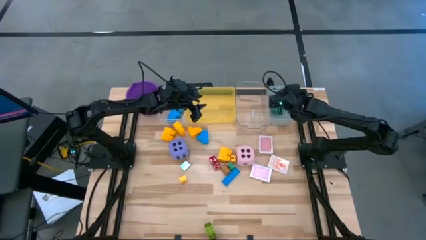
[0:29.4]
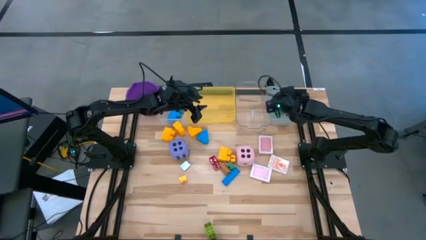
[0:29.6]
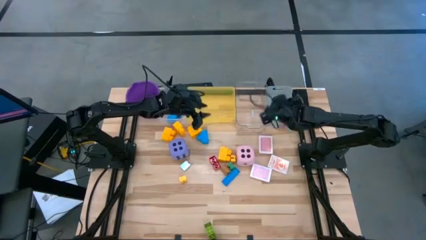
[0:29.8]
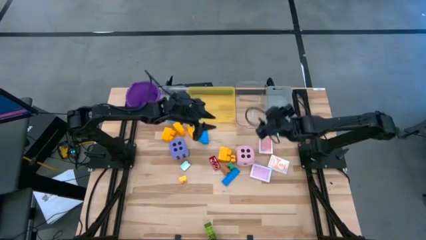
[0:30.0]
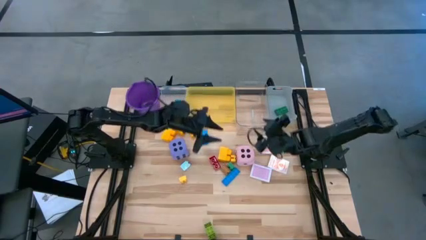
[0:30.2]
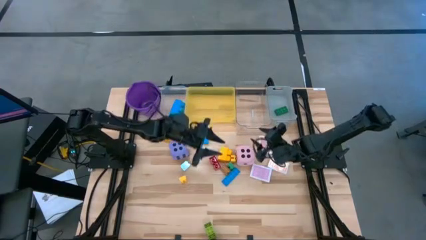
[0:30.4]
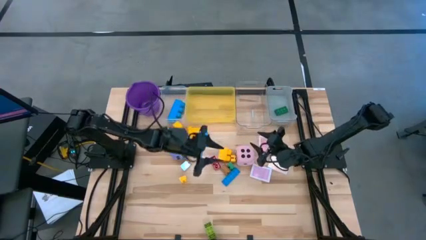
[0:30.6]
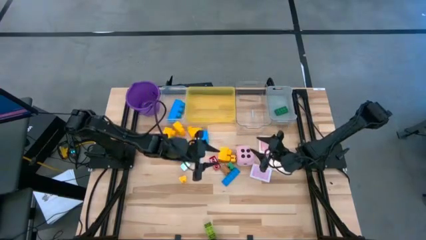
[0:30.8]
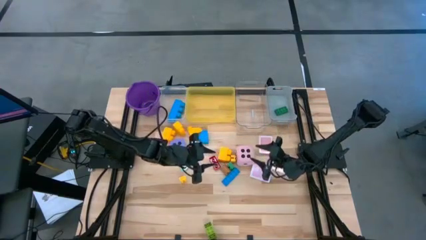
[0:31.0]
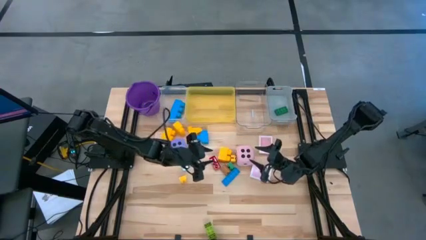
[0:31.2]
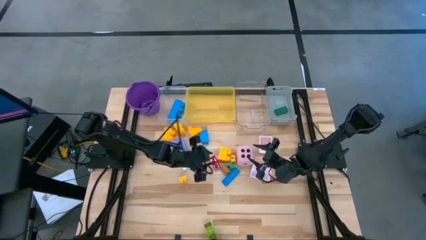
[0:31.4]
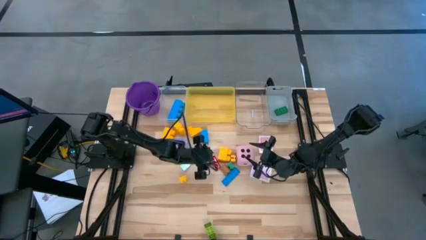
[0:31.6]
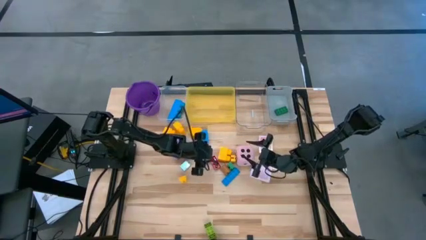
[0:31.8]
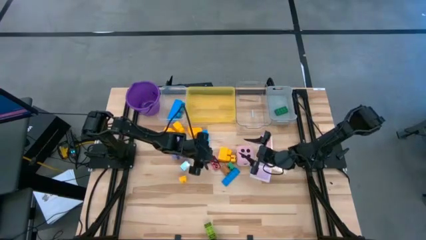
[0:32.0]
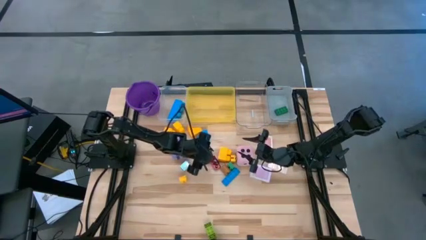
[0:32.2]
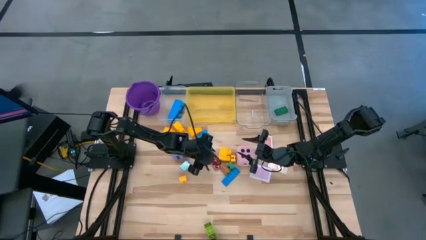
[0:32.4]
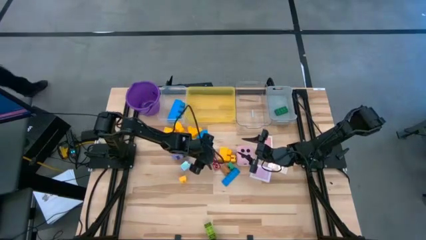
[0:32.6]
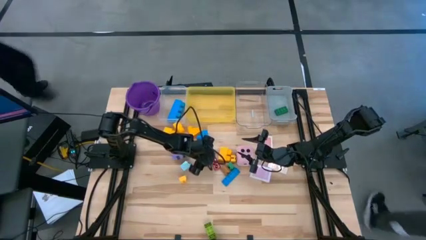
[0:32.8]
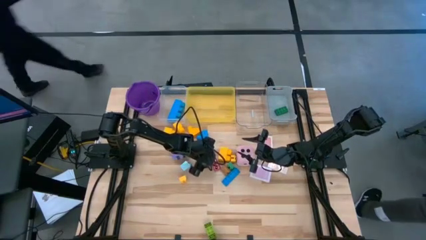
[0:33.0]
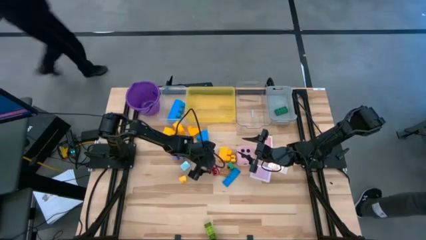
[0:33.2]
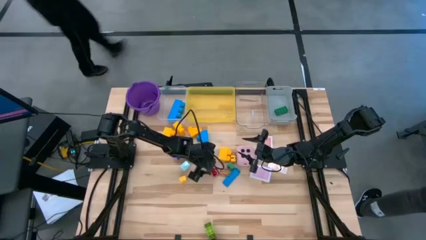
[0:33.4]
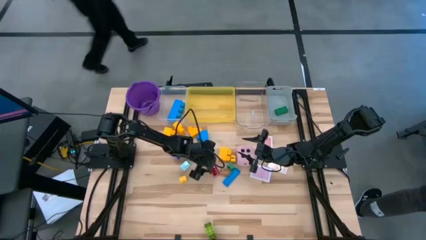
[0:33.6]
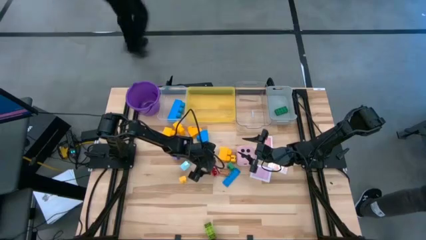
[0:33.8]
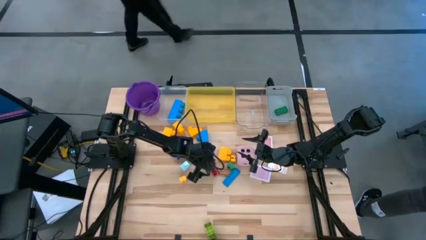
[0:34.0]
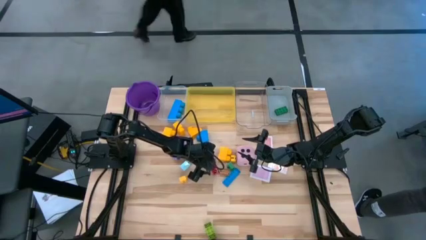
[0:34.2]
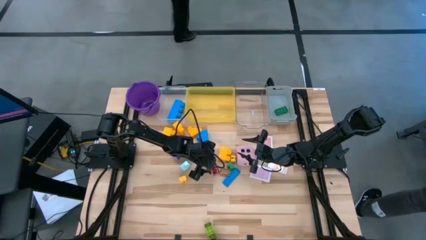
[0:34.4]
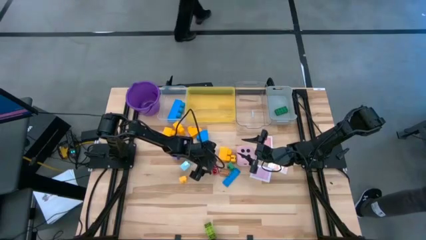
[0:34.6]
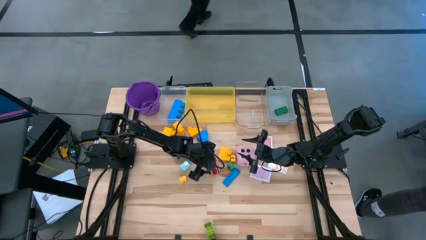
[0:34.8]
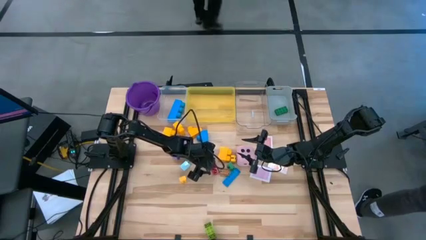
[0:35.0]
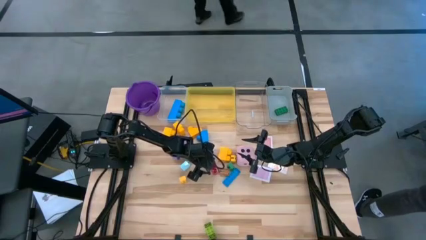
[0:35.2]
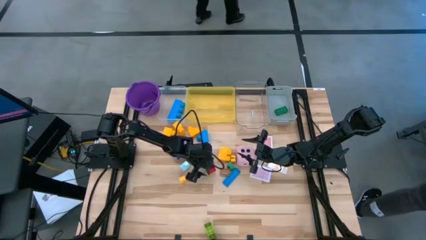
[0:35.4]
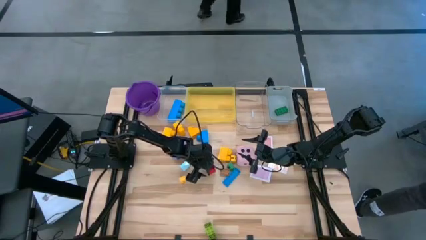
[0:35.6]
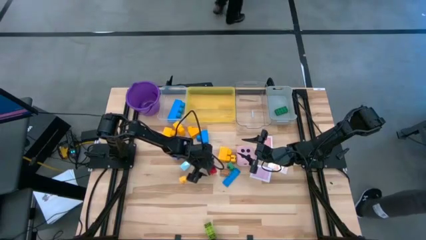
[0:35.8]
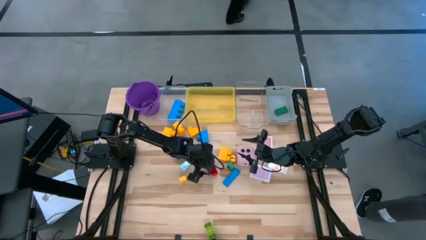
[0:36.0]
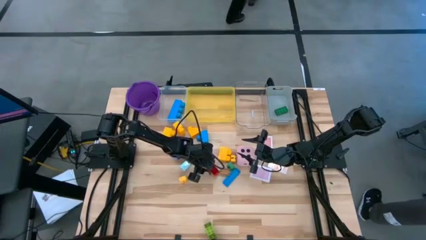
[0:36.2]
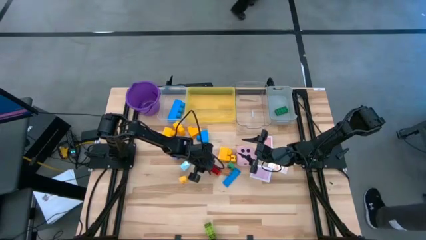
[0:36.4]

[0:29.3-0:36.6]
Task: Pick & Place Toys
Put the small red game piece into the gray bin

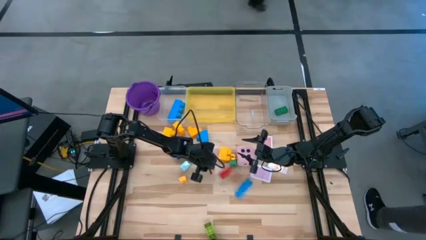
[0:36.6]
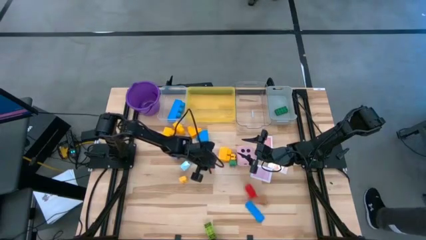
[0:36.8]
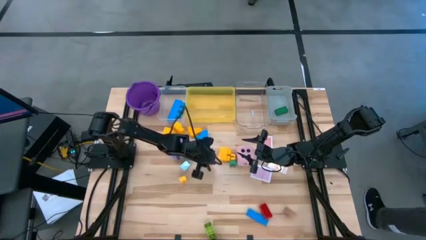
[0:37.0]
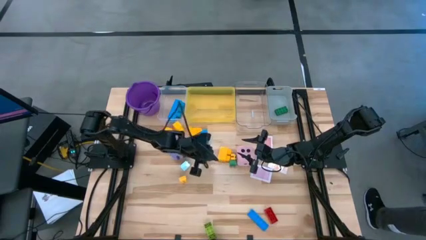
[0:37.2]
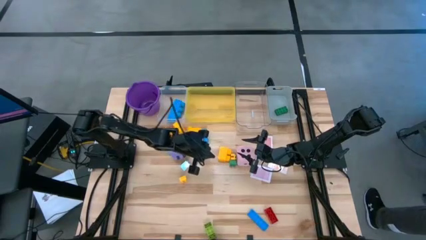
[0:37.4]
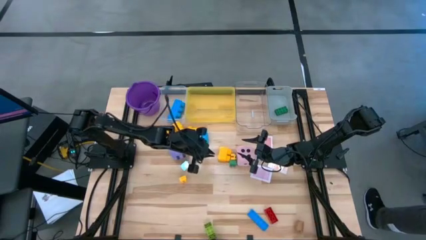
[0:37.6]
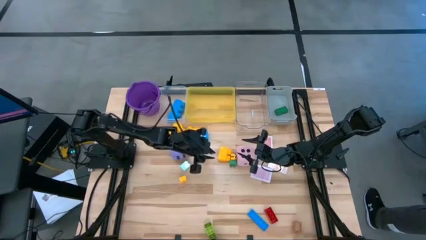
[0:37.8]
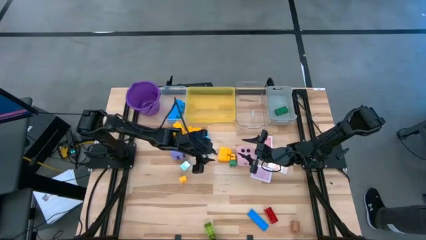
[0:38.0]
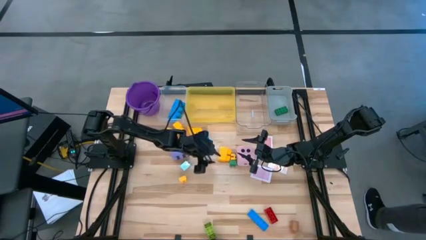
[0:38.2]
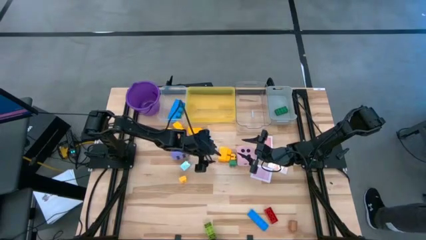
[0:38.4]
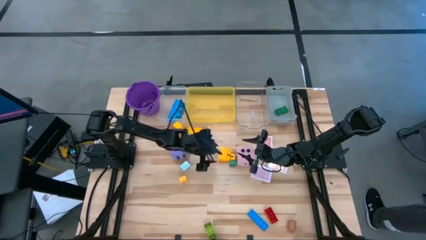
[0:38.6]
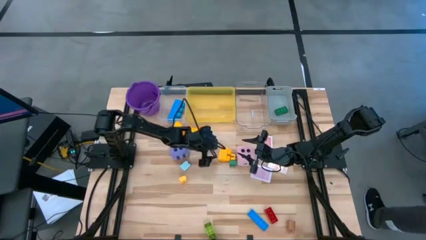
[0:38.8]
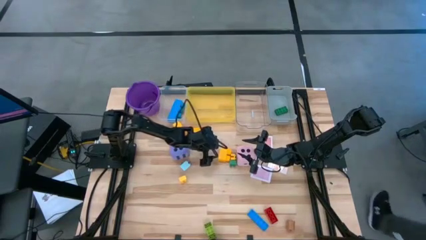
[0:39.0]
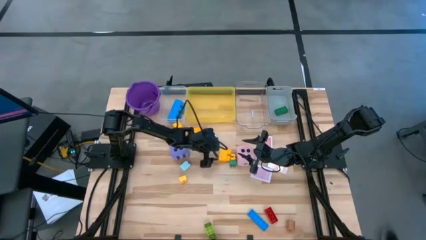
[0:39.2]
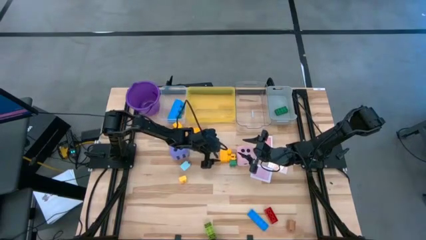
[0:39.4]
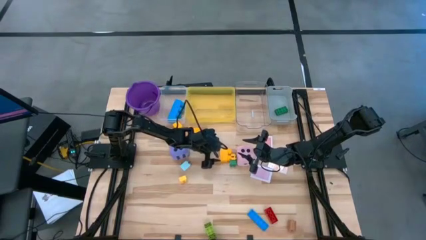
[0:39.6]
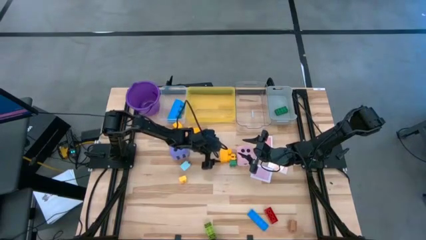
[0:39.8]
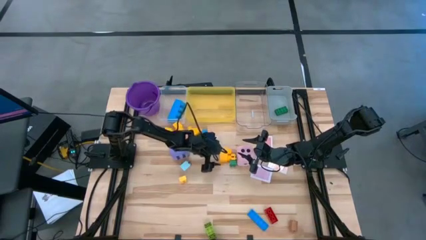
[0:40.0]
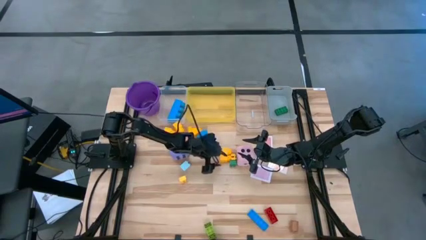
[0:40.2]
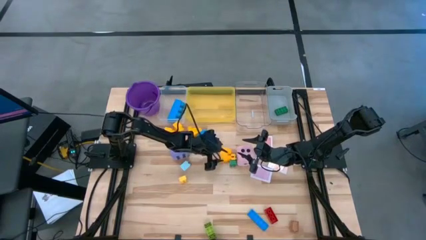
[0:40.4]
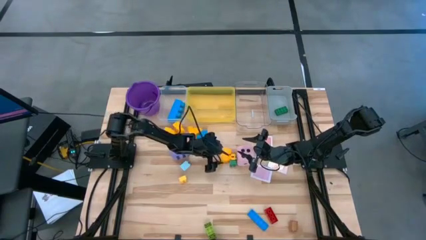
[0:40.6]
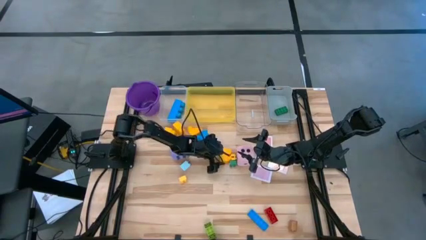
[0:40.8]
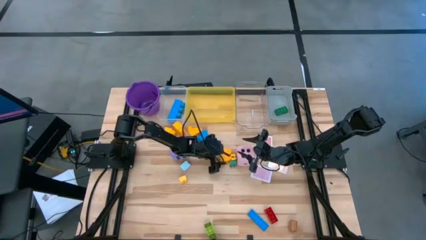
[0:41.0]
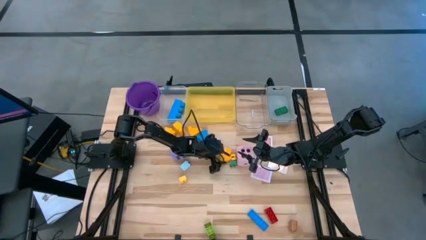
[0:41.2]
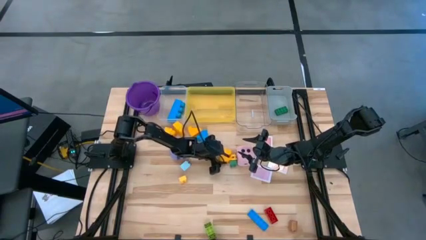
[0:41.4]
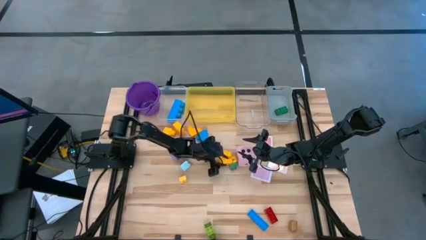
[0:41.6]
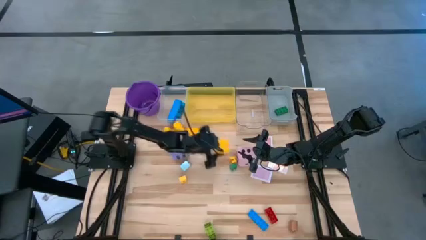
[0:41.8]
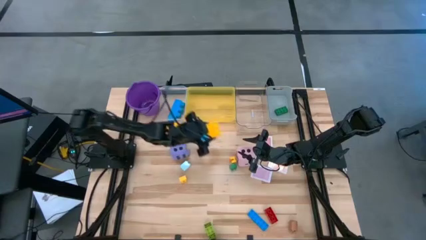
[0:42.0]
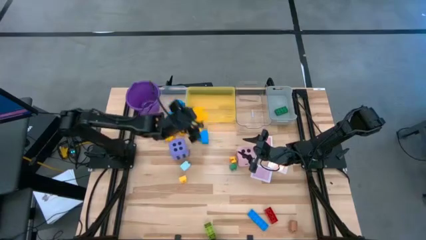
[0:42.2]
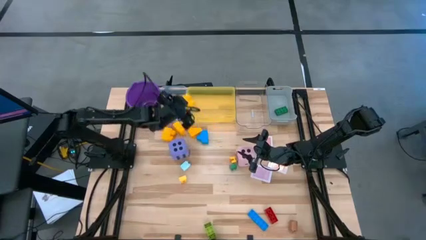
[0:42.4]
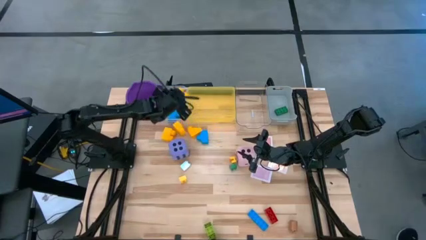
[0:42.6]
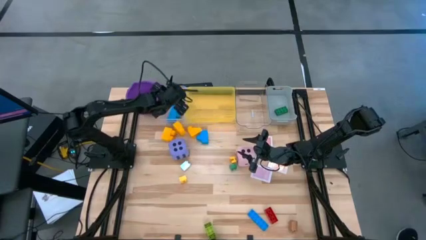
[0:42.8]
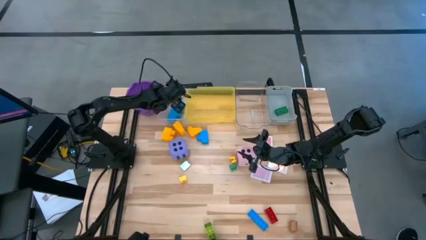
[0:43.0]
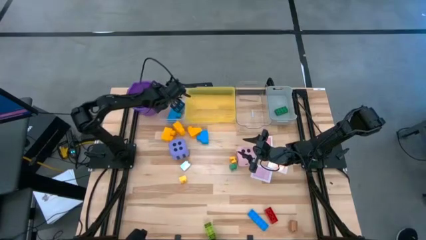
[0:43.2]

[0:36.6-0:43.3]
Put the large yellow game piece into the white transparent bin

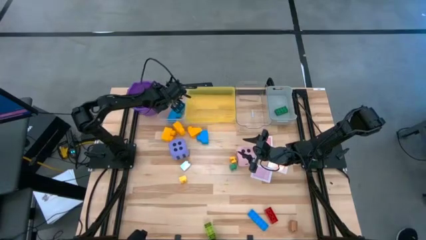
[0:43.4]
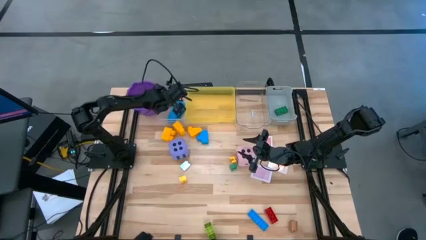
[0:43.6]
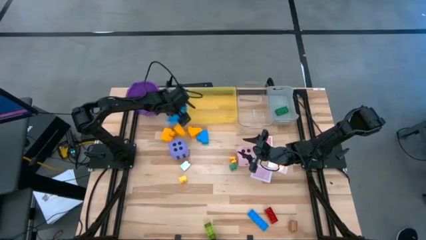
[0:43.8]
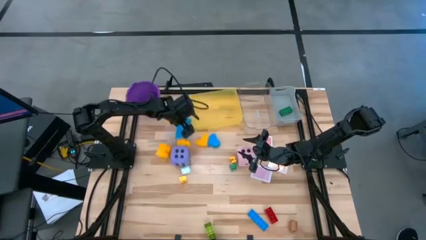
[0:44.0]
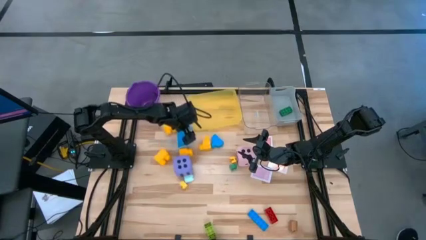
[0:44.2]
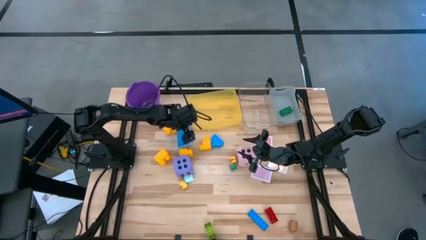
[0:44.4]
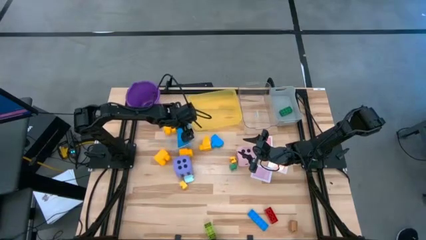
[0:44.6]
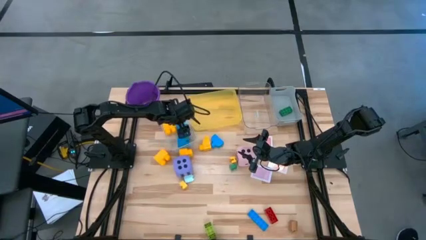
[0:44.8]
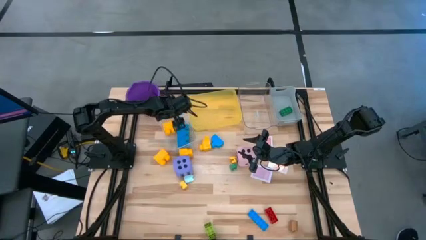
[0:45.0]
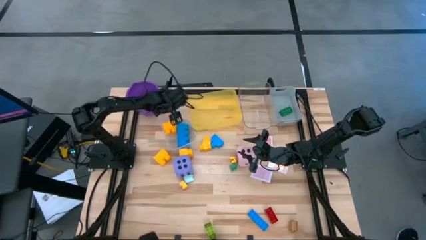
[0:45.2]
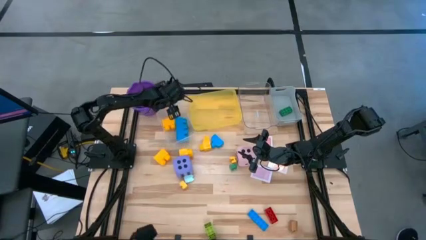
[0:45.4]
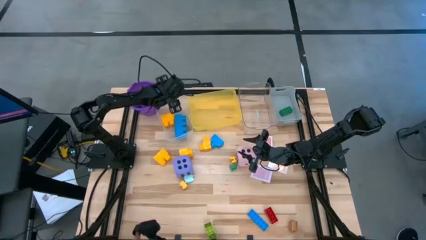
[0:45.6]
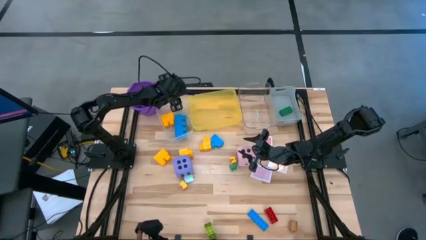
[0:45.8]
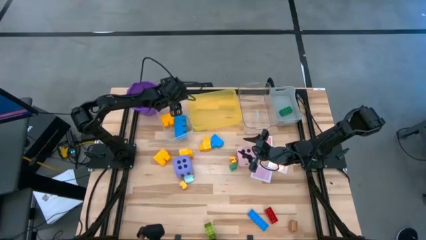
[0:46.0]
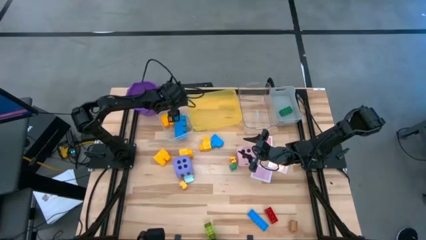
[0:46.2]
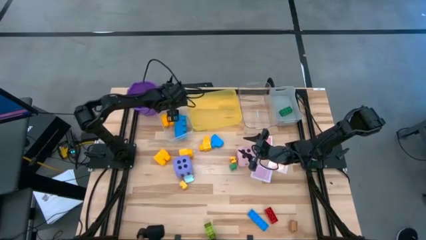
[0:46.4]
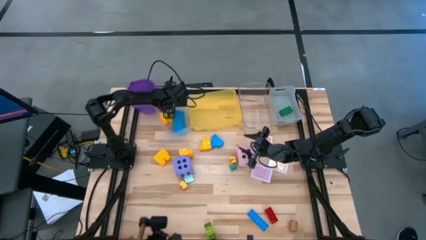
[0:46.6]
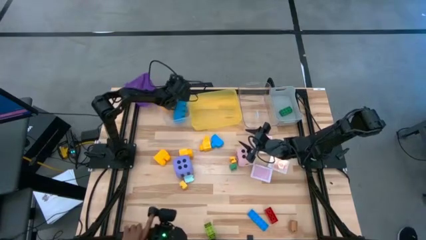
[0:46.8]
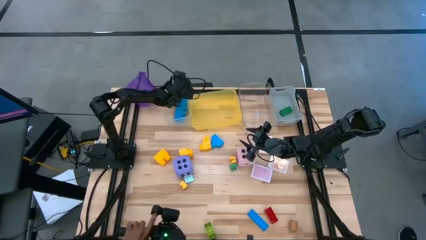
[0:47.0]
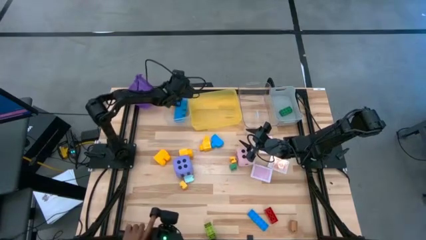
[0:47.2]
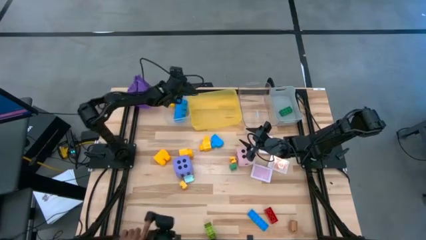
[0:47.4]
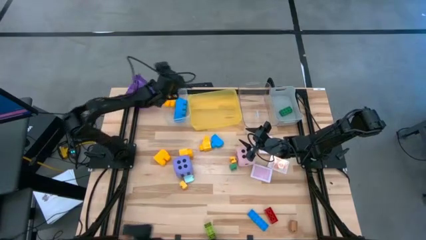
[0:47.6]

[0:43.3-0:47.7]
Adjust the white bin
